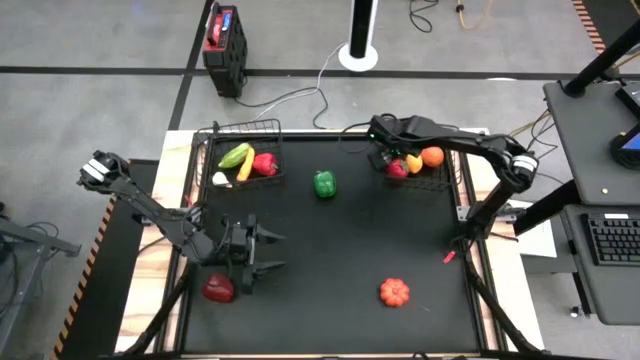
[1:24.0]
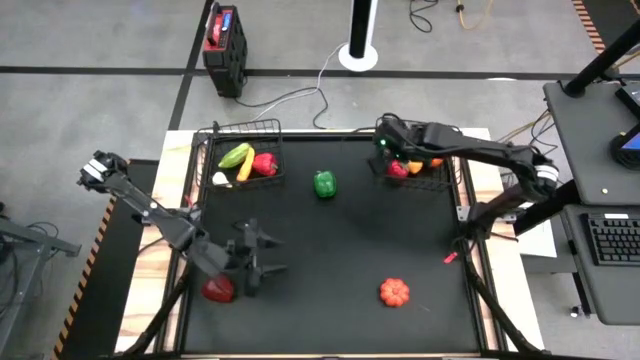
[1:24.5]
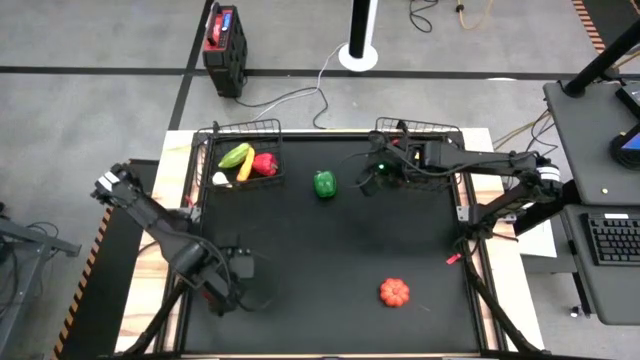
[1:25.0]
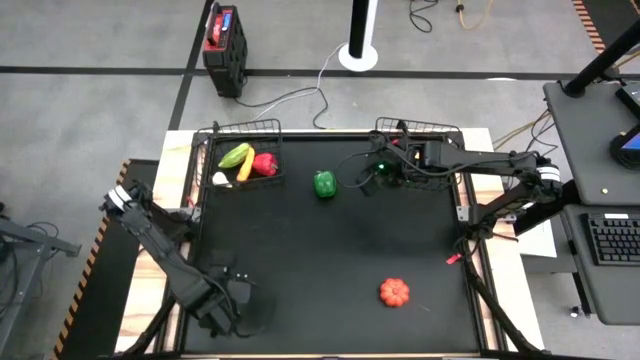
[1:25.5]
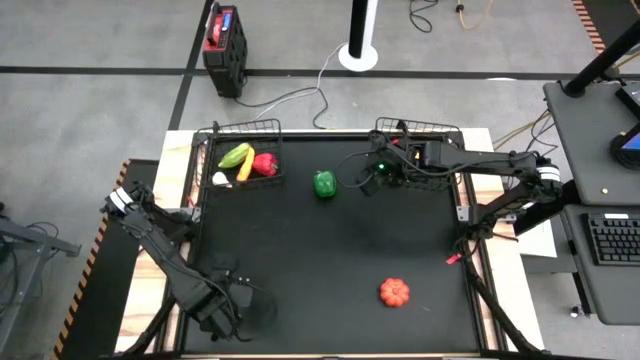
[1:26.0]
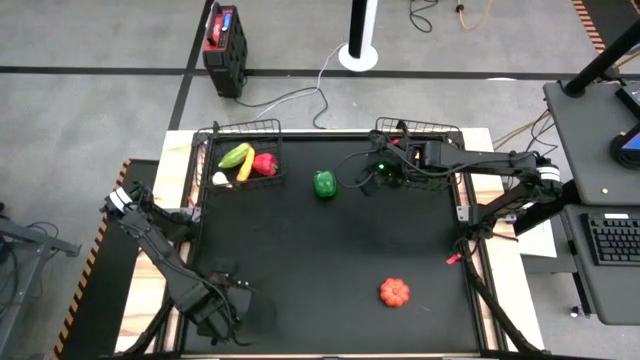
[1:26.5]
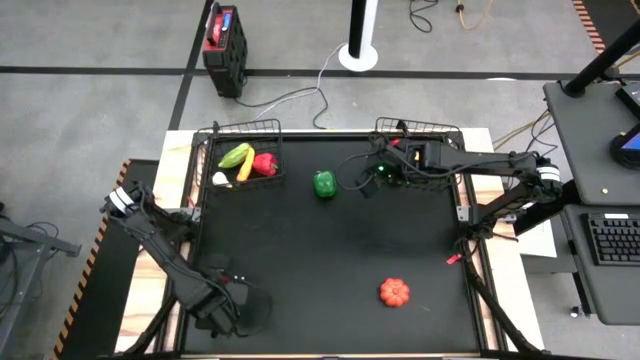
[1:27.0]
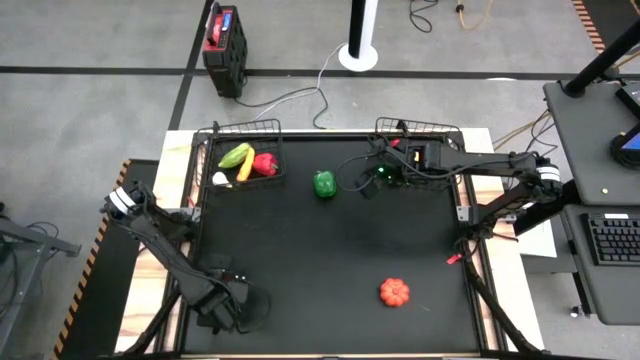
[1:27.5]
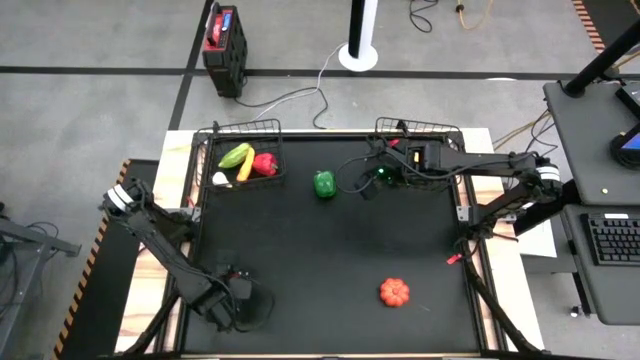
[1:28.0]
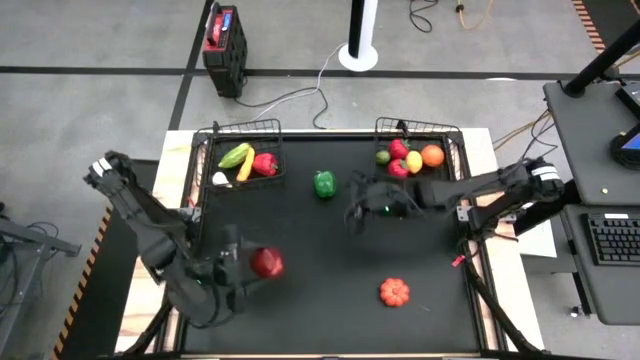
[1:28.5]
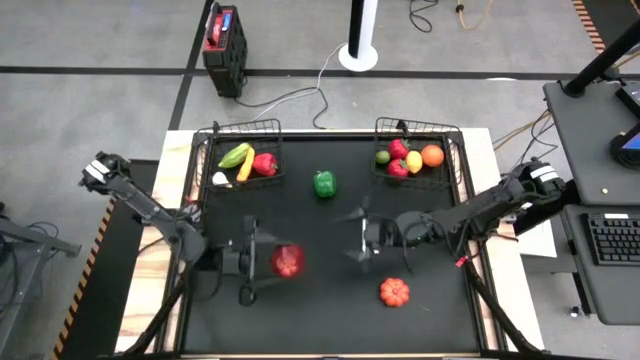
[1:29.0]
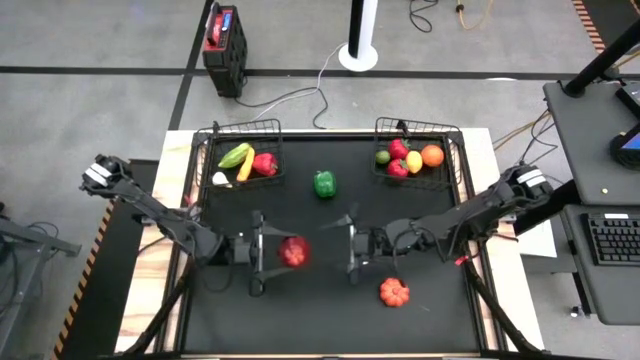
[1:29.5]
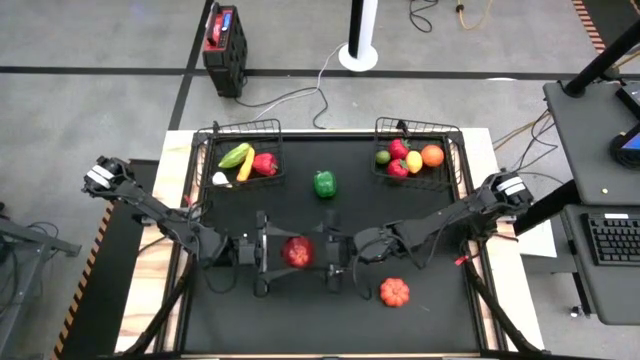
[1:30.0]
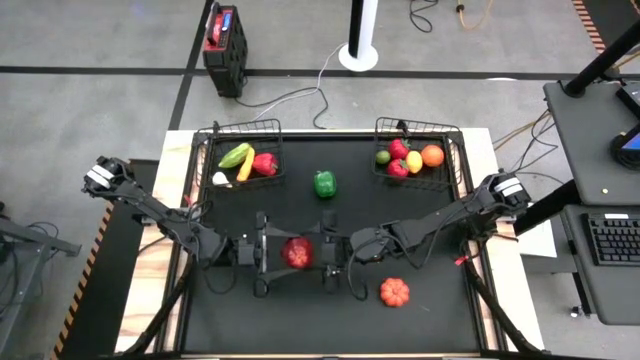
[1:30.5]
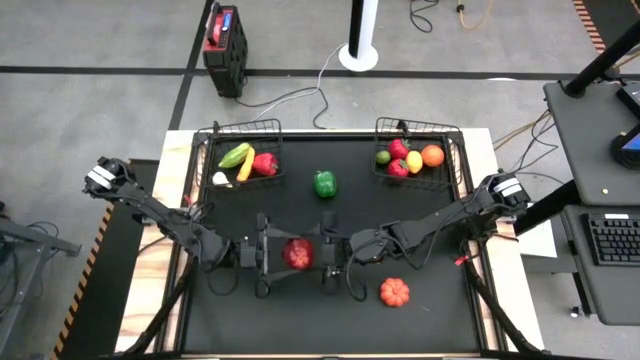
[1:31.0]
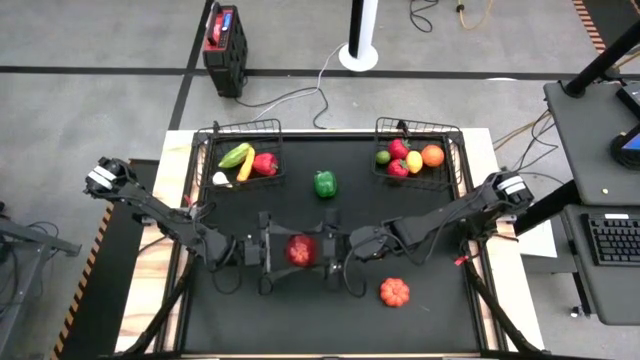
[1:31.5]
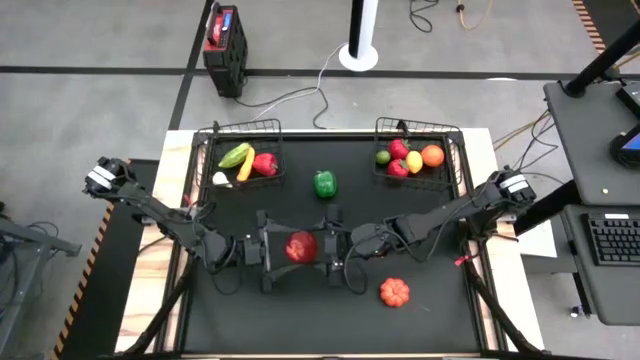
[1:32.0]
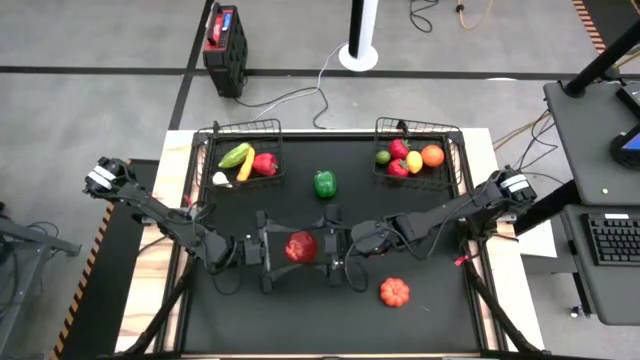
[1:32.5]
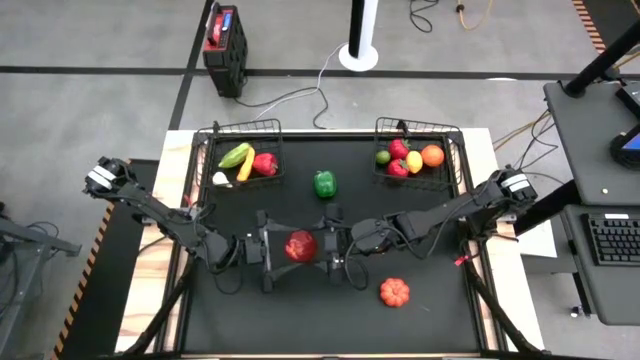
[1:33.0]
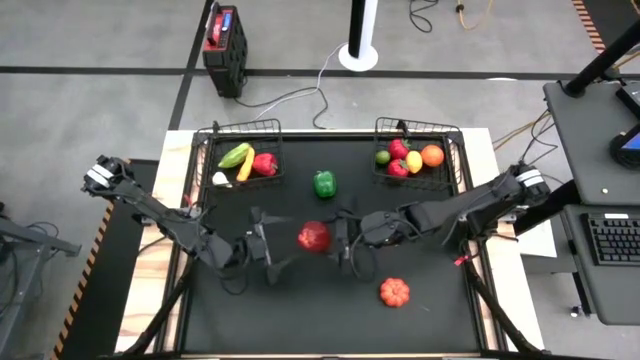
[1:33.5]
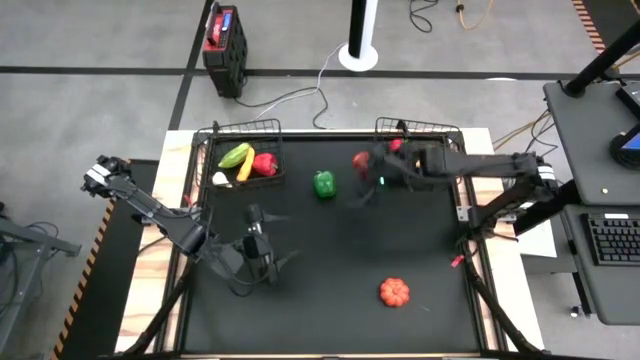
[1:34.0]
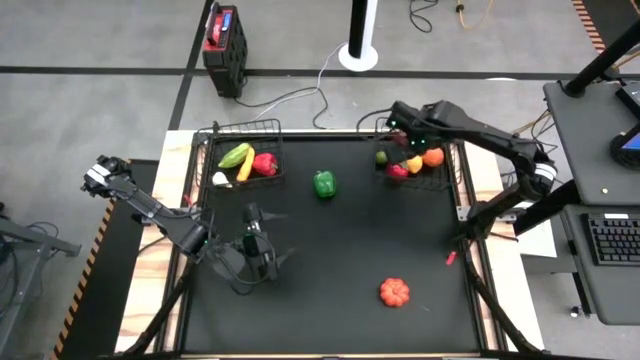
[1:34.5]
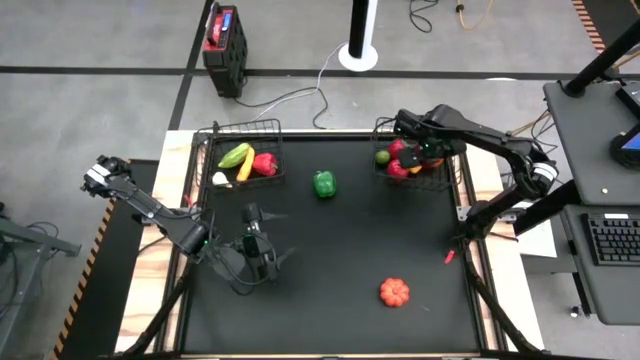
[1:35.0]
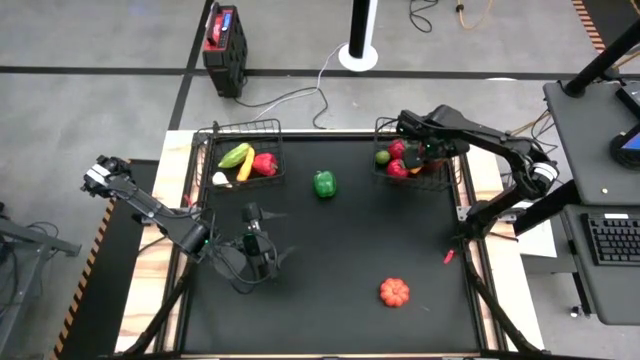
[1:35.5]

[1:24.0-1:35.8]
Task: Sort produce into baskets
Put the apple into the right wire basket

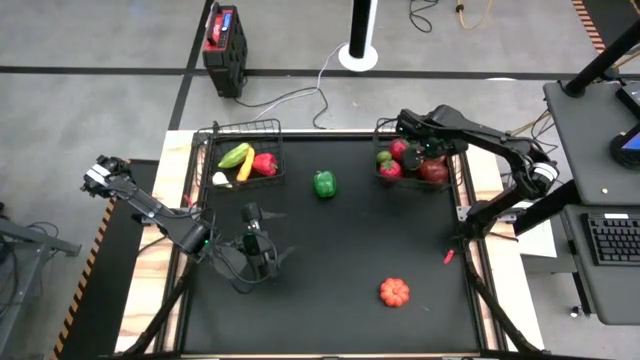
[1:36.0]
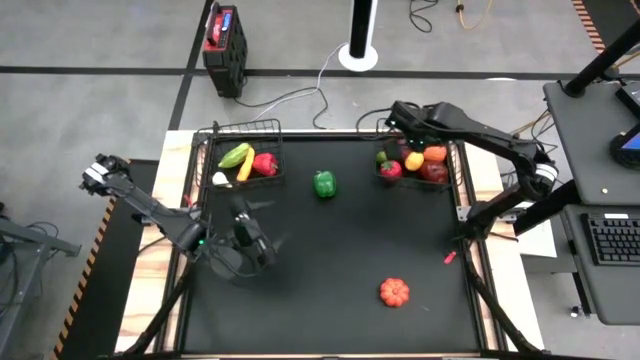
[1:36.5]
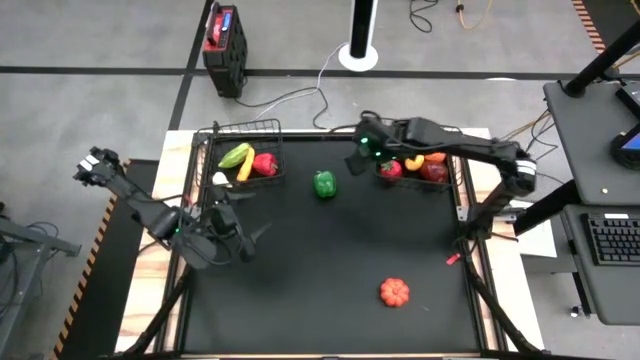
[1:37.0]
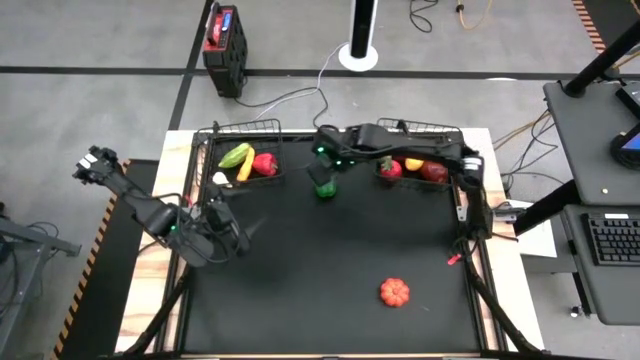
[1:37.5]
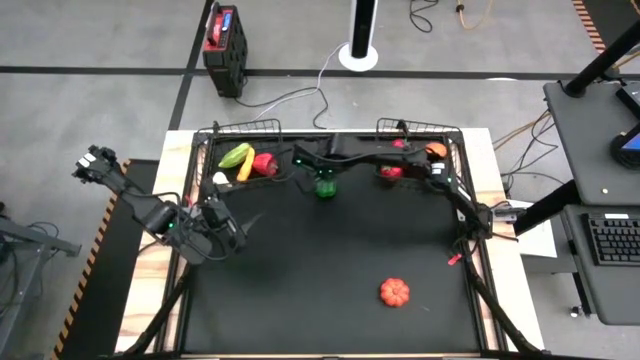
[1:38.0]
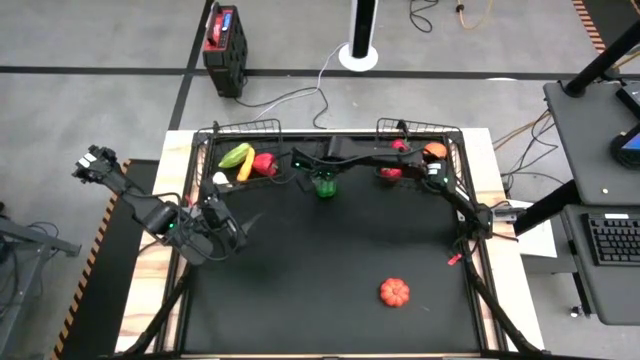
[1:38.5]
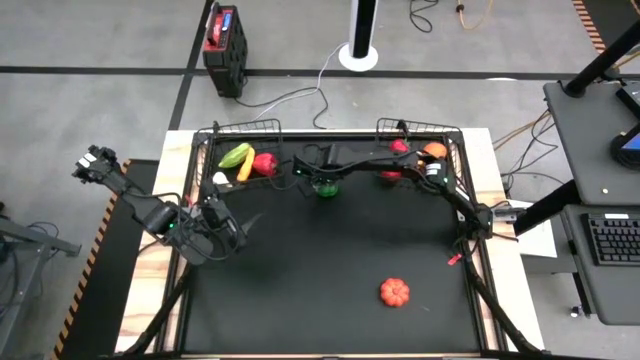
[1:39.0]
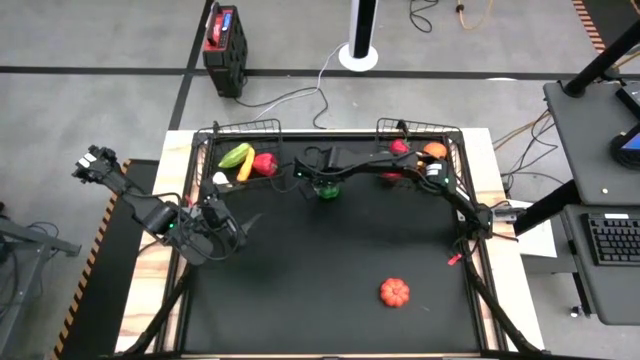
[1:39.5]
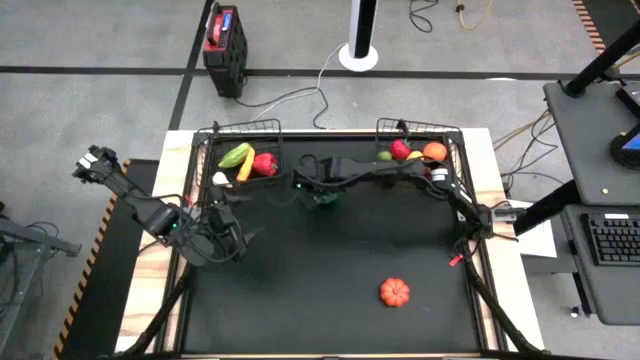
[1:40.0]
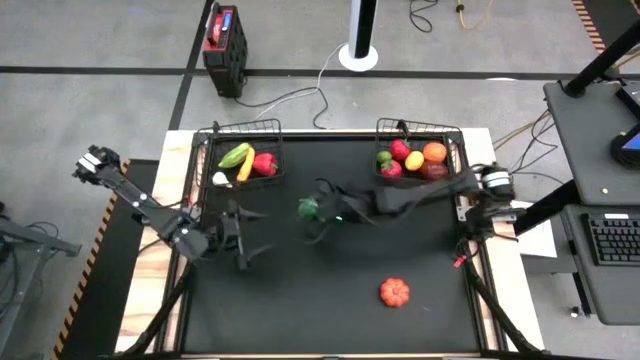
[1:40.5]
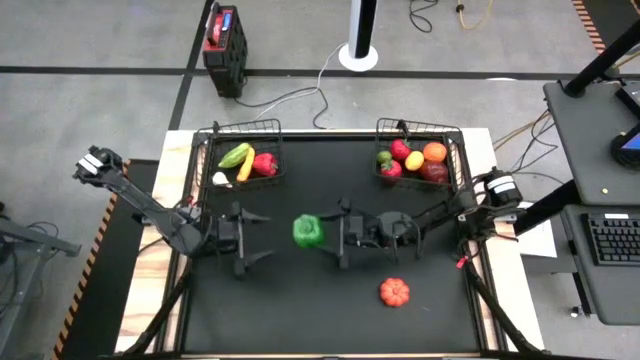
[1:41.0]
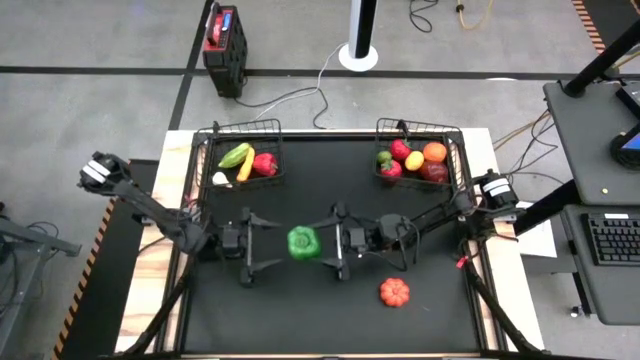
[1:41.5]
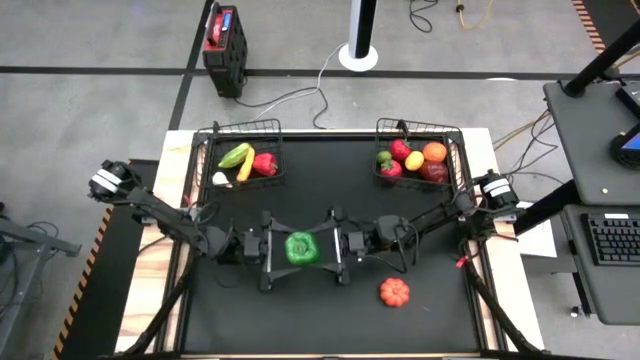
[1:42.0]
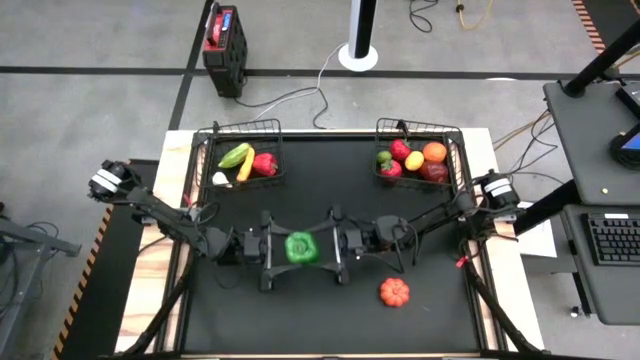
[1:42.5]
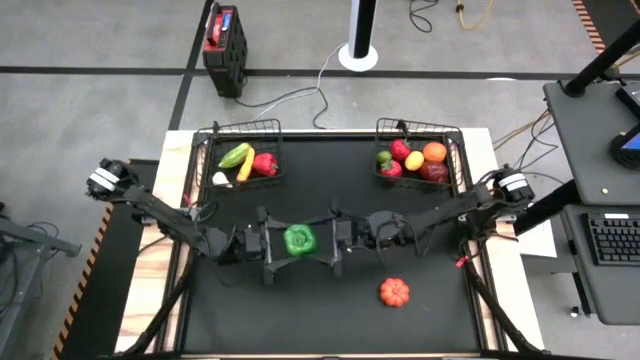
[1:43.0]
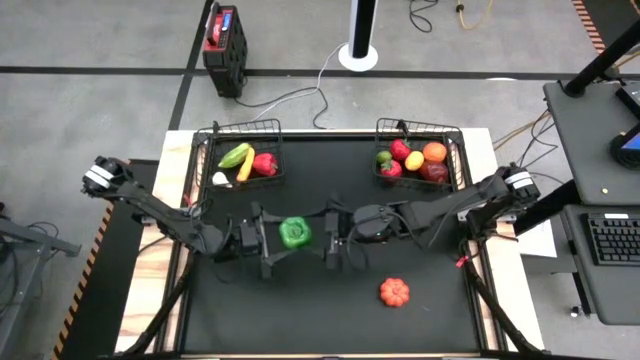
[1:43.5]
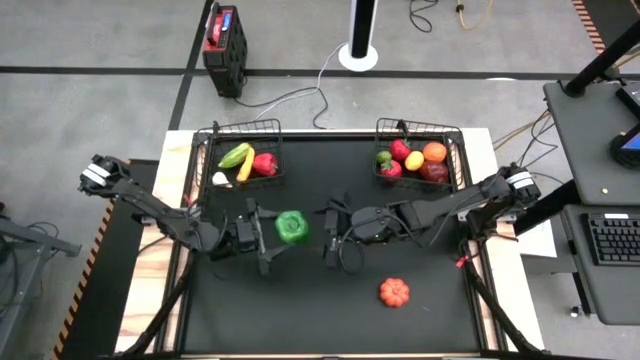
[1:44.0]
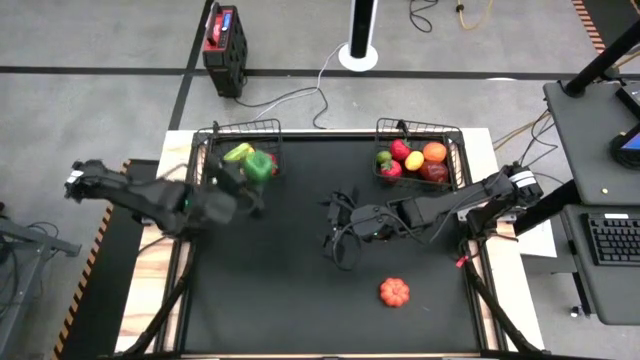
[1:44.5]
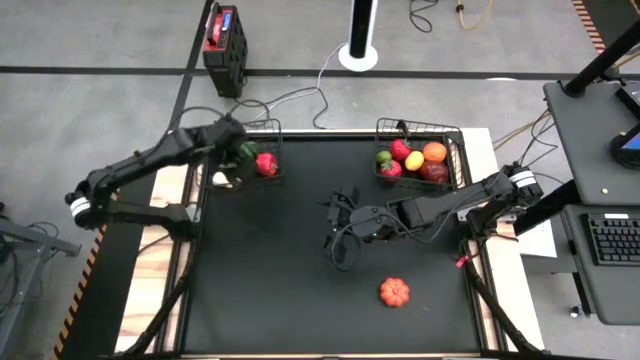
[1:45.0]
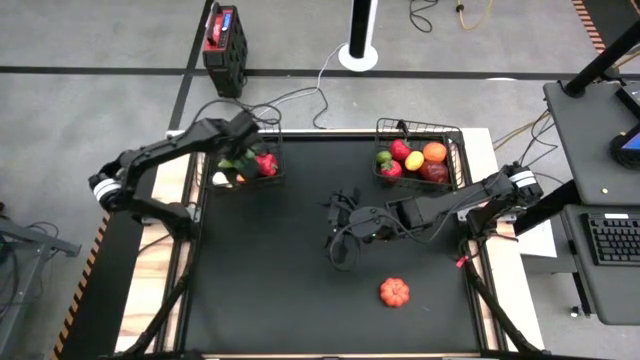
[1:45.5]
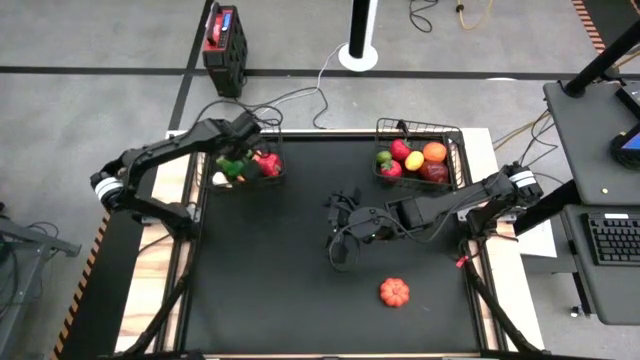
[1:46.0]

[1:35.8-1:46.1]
Put the green bell pepper into the left wire basket
